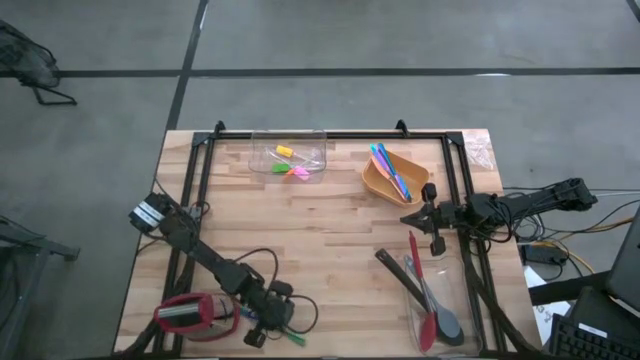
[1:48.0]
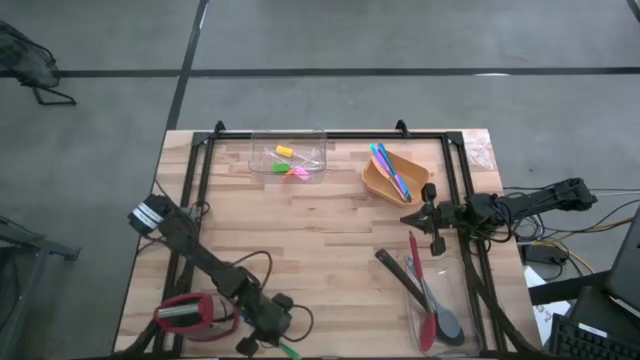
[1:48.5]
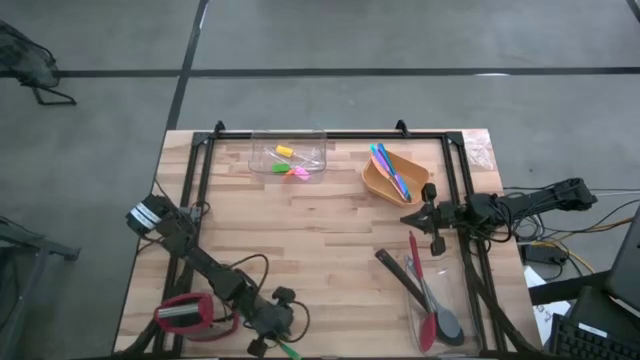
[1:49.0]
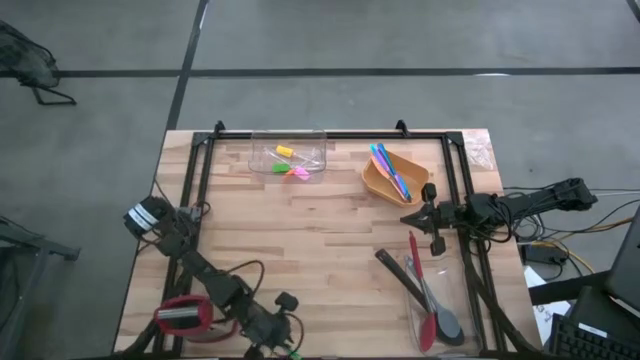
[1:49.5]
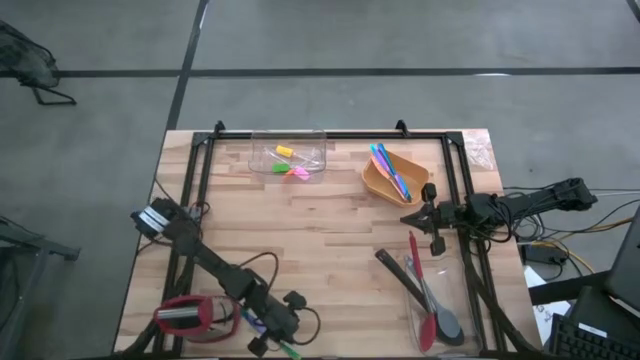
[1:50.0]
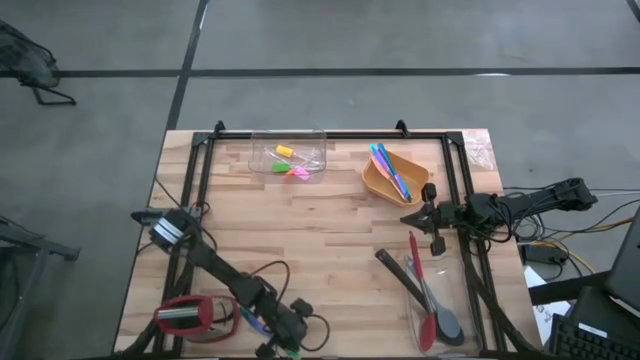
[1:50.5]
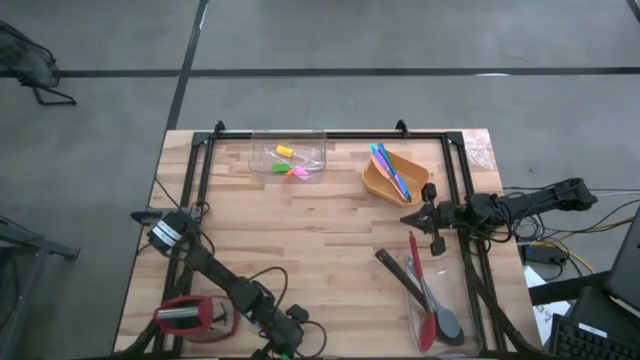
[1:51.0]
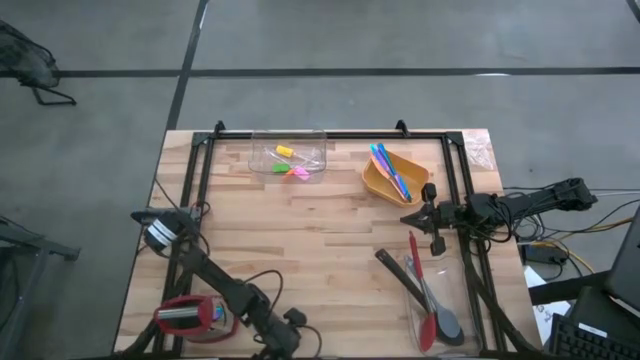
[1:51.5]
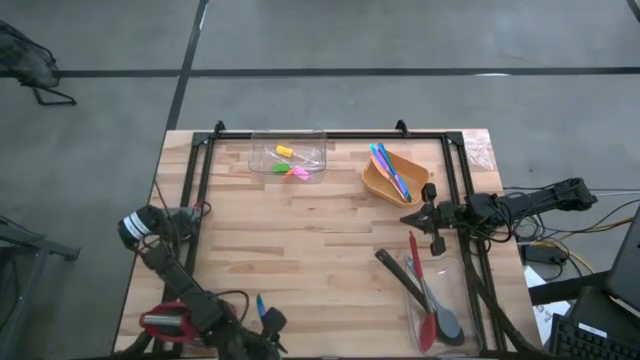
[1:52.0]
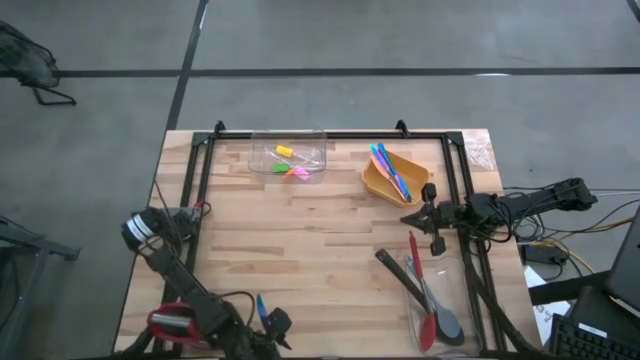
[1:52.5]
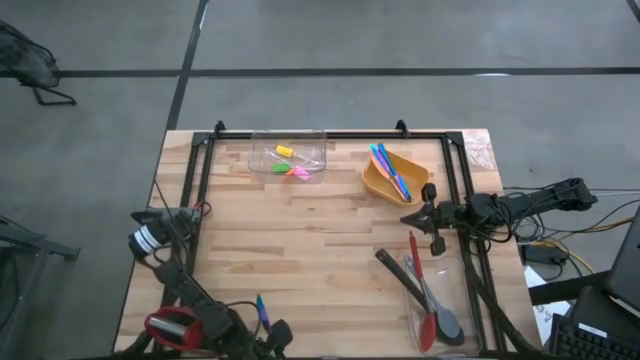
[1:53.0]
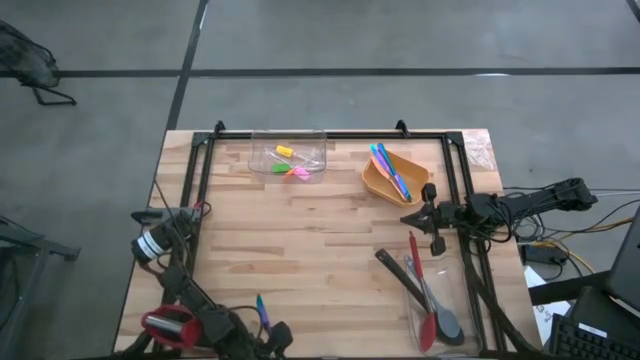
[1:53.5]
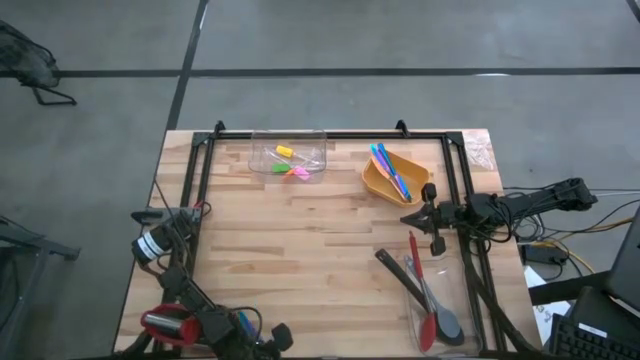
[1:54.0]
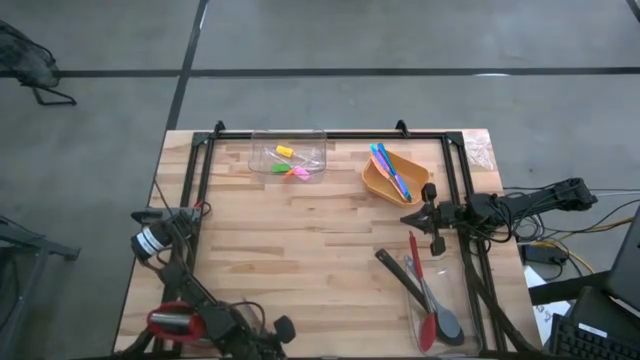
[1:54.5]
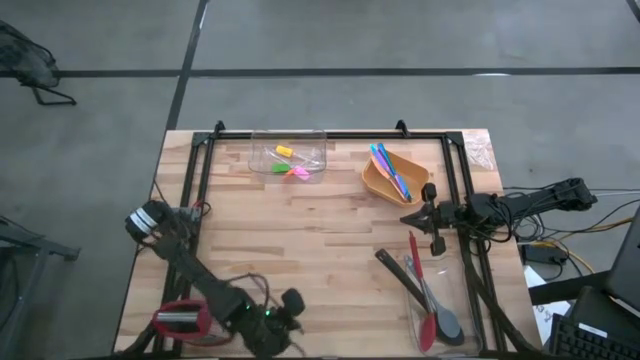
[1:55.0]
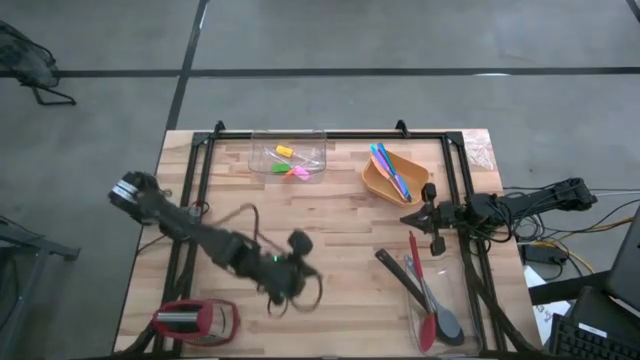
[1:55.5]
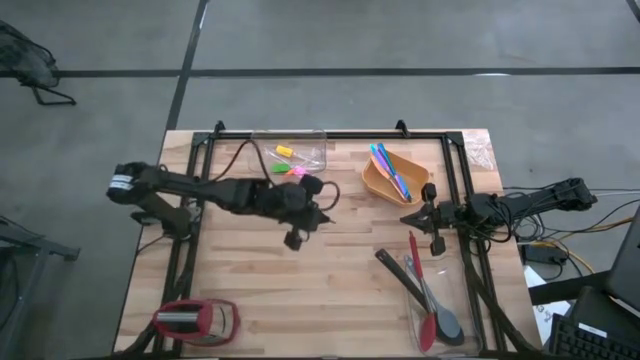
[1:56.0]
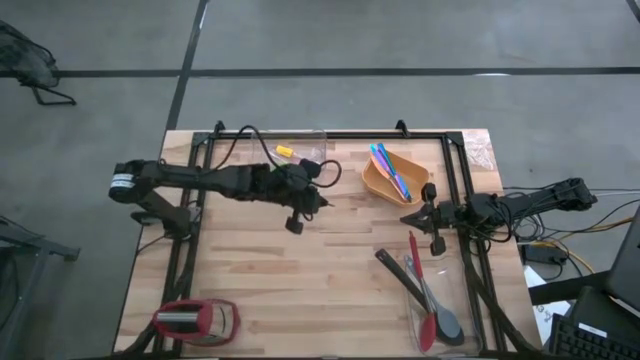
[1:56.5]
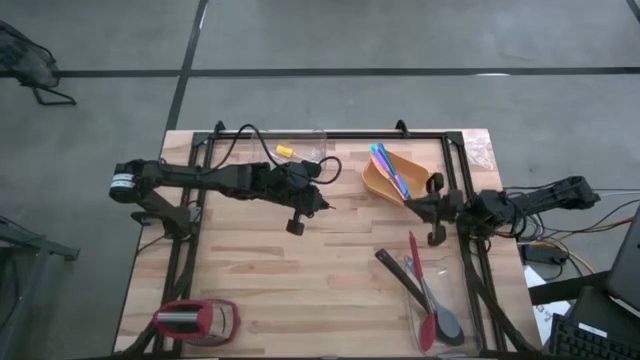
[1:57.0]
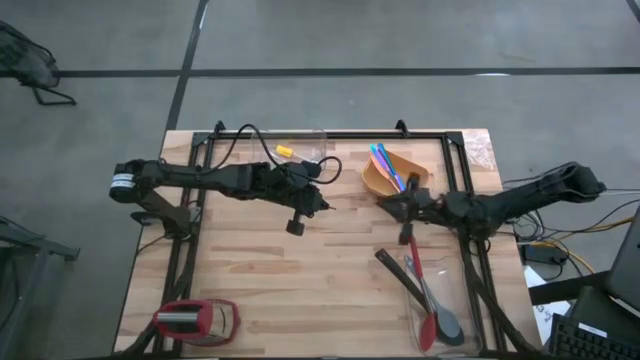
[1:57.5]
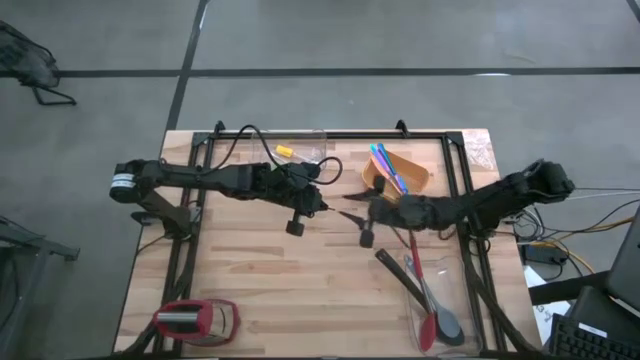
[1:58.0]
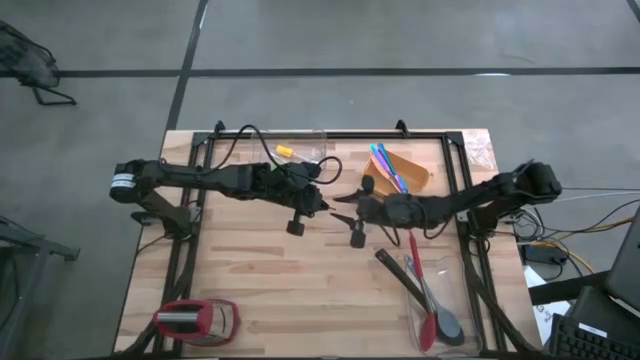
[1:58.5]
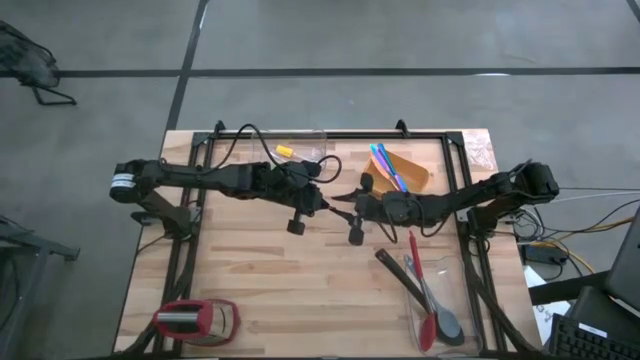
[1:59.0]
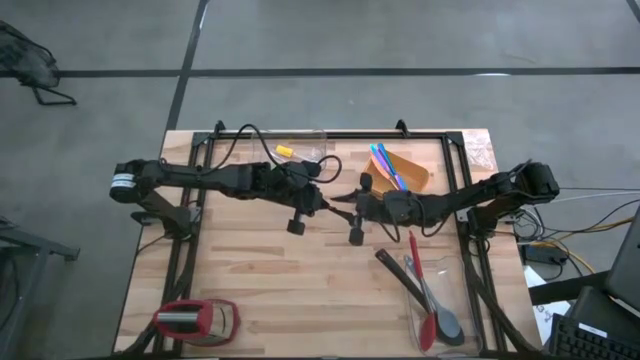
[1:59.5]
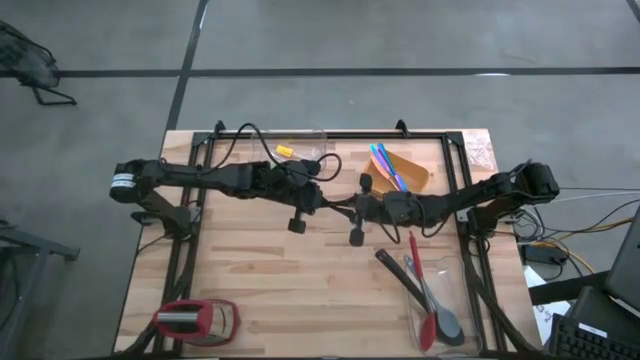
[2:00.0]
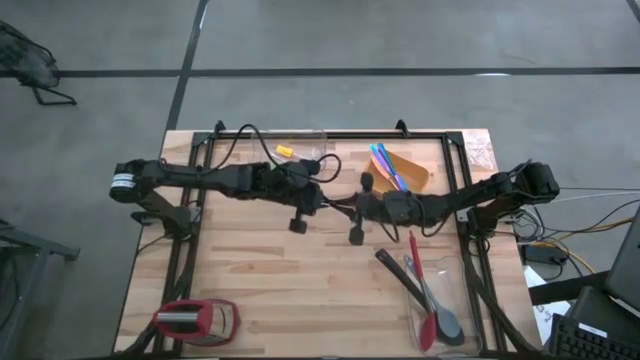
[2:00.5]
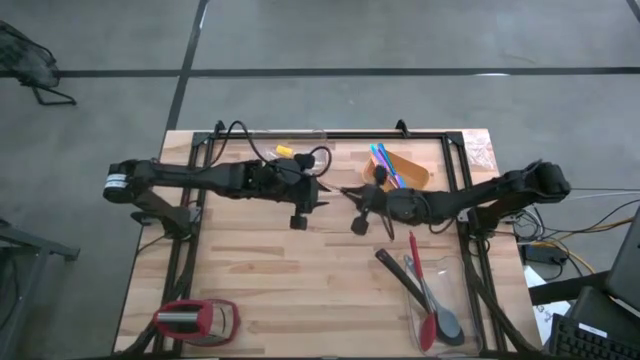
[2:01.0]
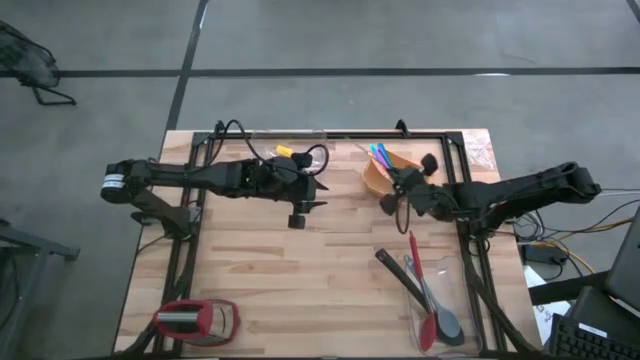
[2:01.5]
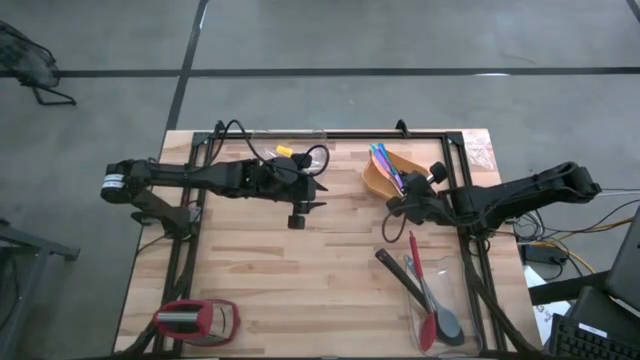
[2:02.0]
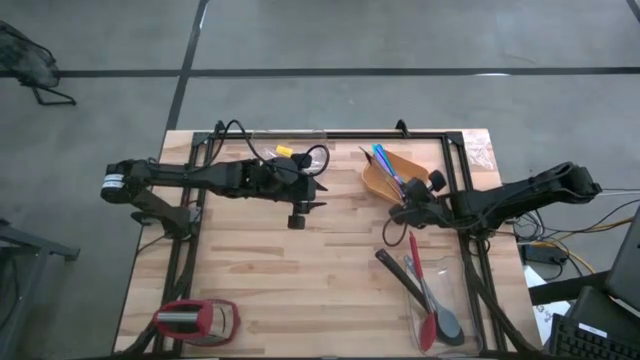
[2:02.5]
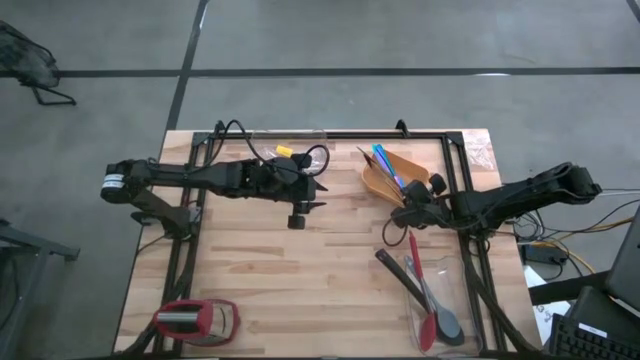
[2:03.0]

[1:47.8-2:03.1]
Task: Pick & Place Kitchen Items
Put the blue kitchen knife into the yellow bin

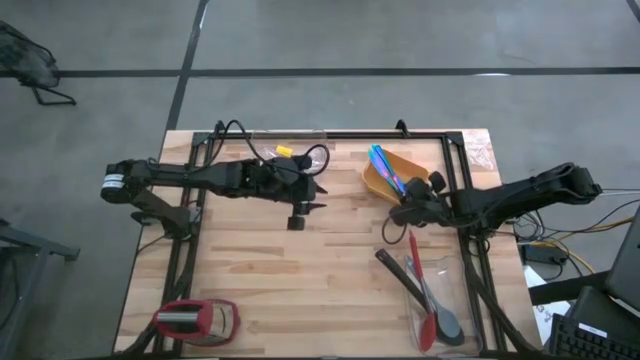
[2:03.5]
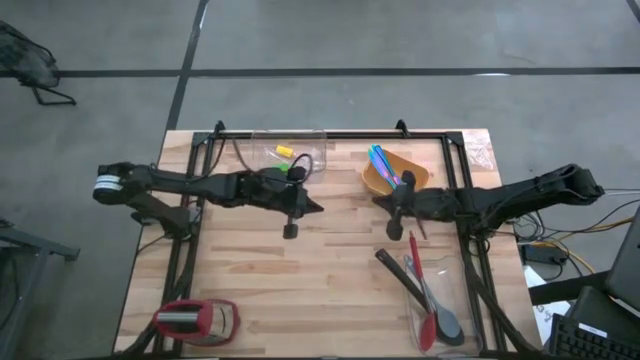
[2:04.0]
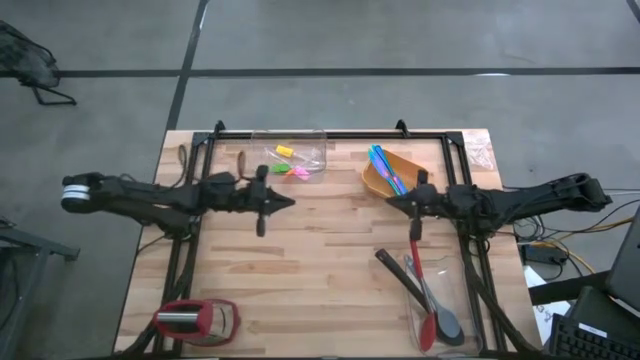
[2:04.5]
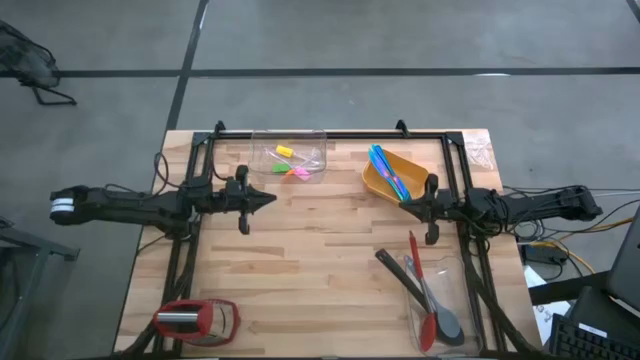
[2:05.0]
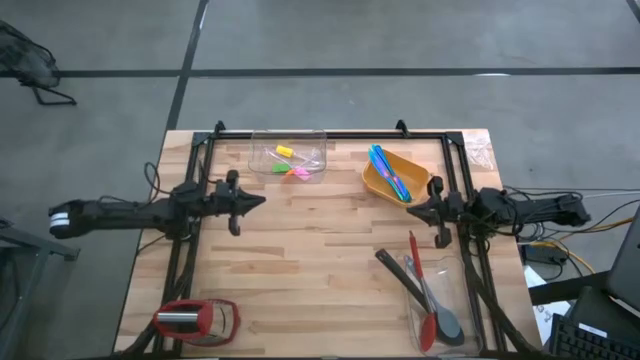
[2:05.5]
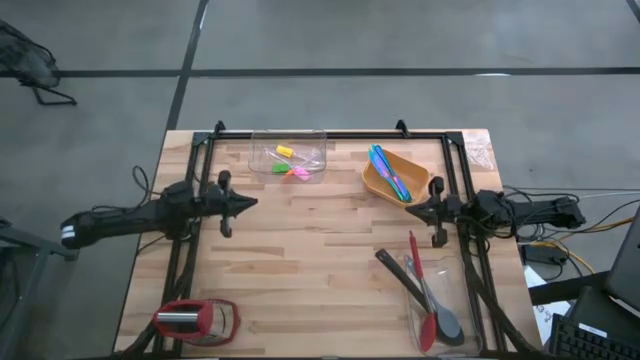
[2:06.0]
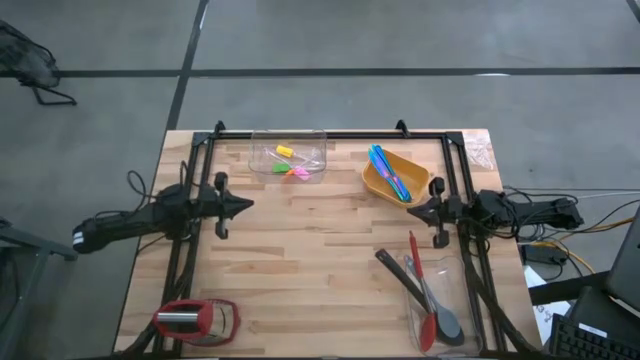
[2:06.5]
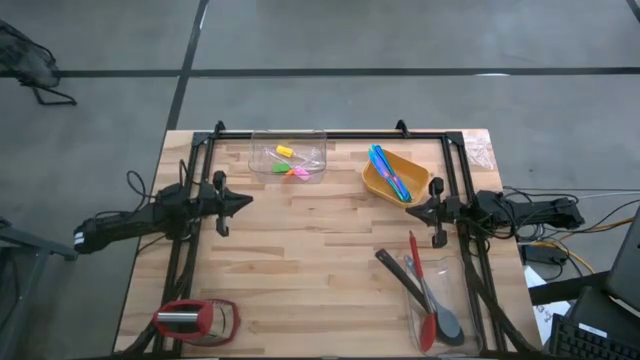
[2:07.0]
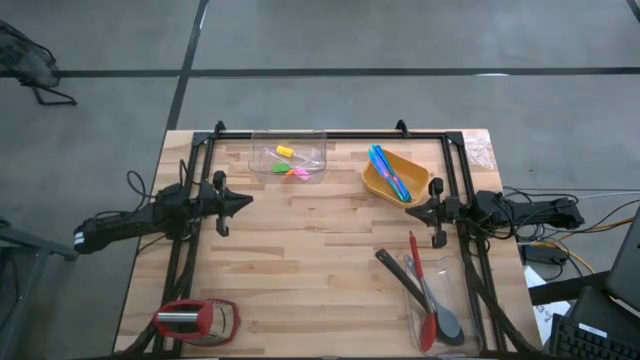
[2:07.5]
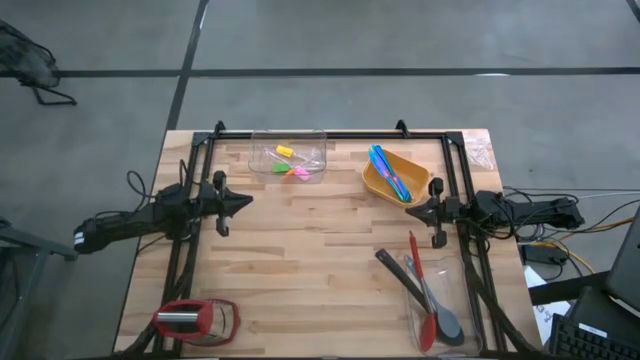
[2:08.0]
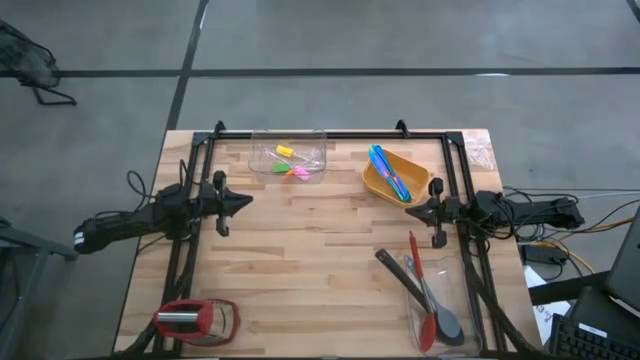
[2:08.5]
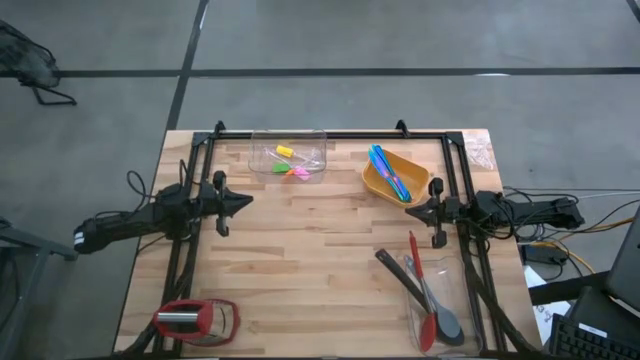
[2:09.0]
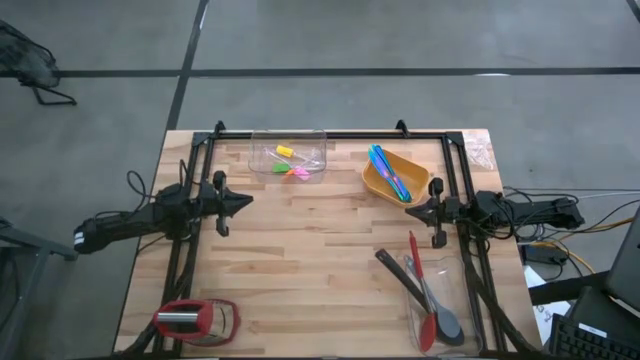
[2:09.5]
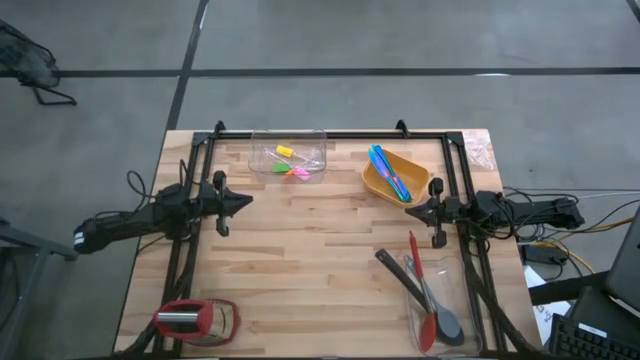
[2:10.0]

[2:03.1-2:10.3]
Return to Home Position
